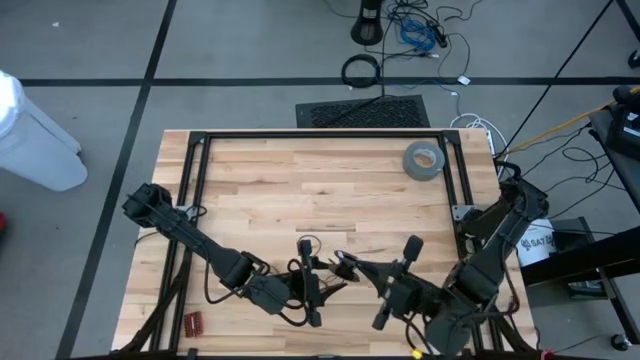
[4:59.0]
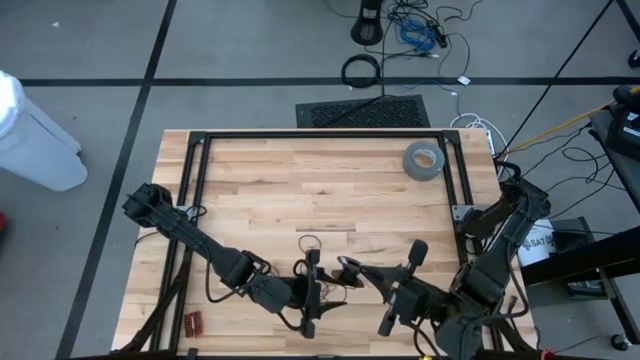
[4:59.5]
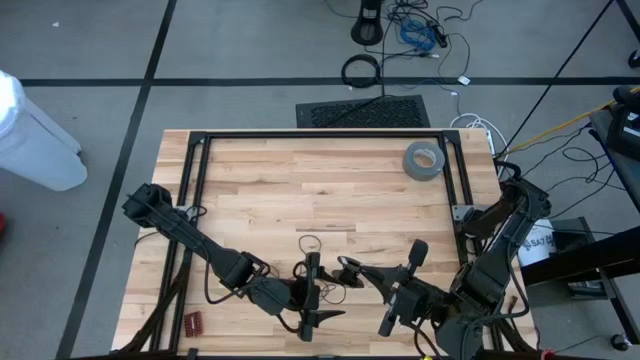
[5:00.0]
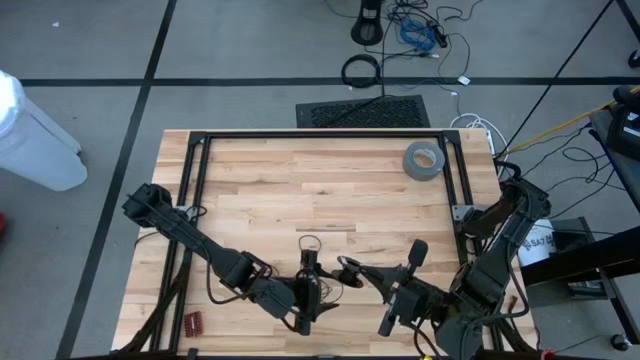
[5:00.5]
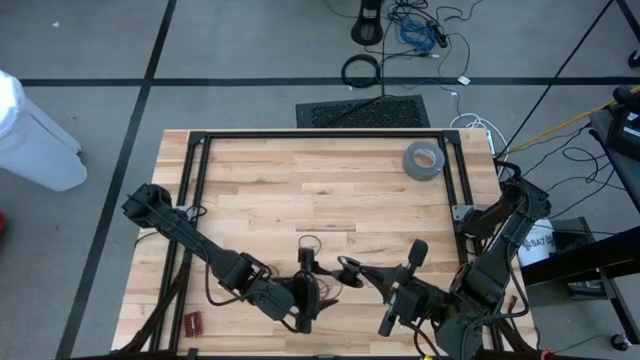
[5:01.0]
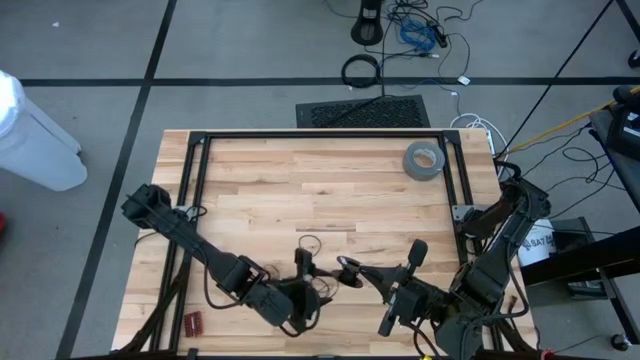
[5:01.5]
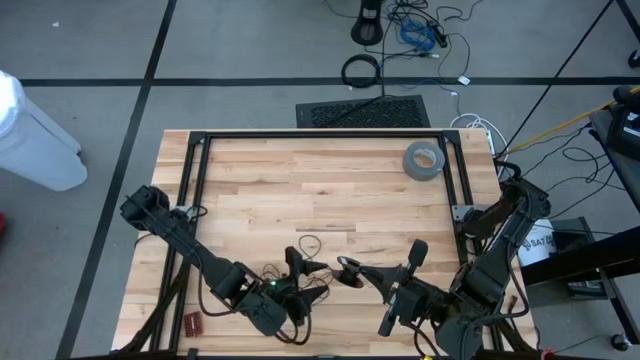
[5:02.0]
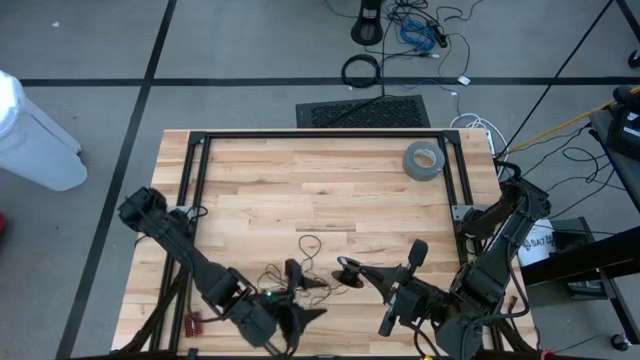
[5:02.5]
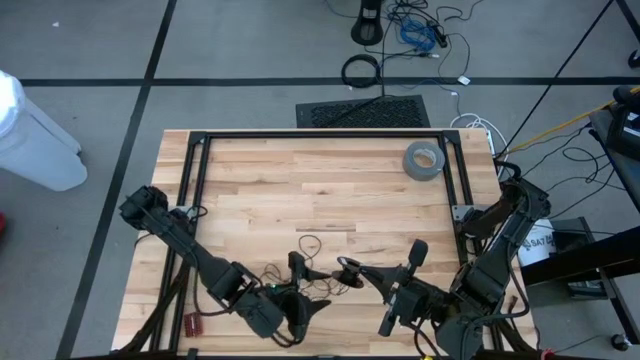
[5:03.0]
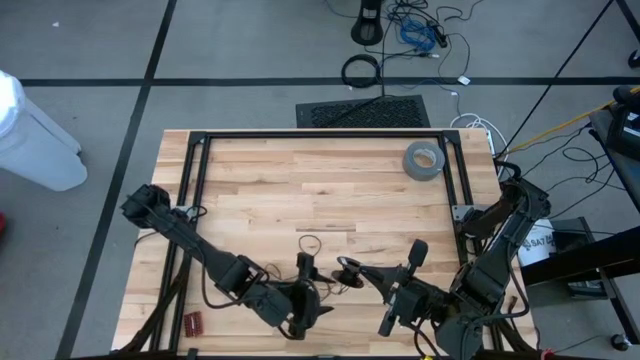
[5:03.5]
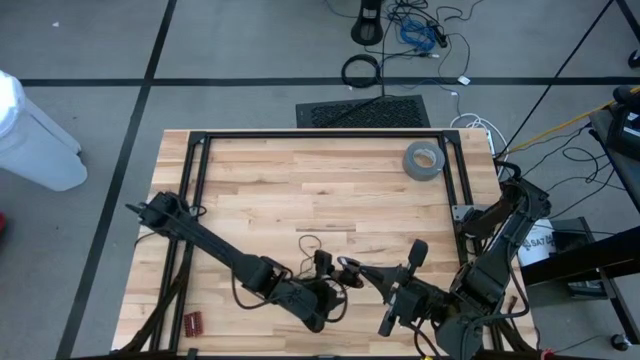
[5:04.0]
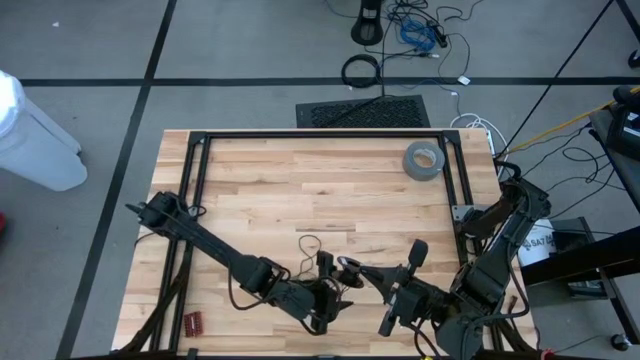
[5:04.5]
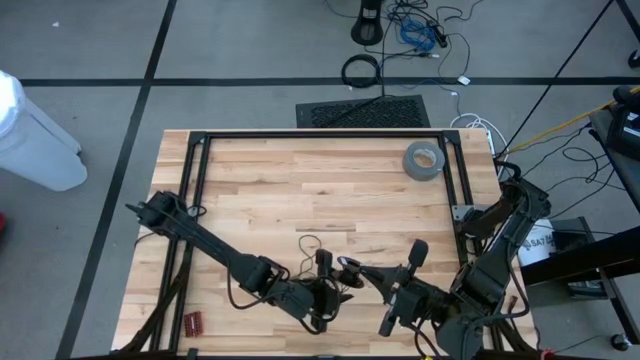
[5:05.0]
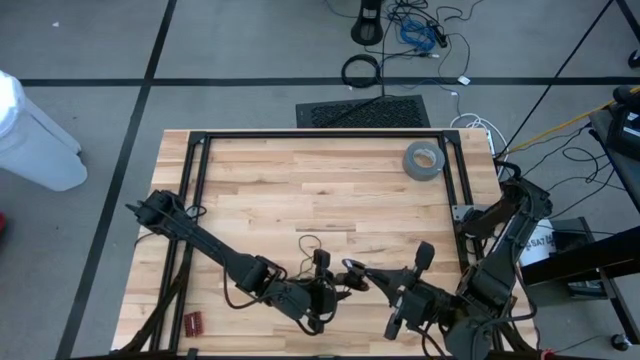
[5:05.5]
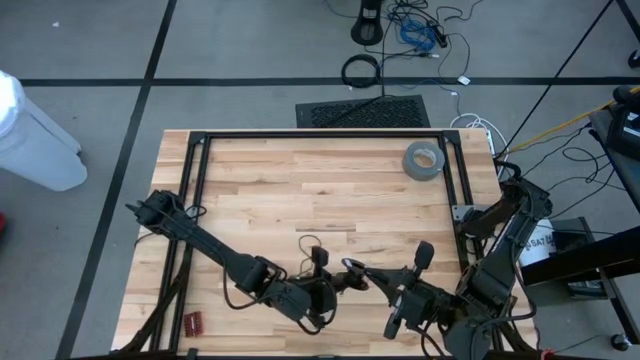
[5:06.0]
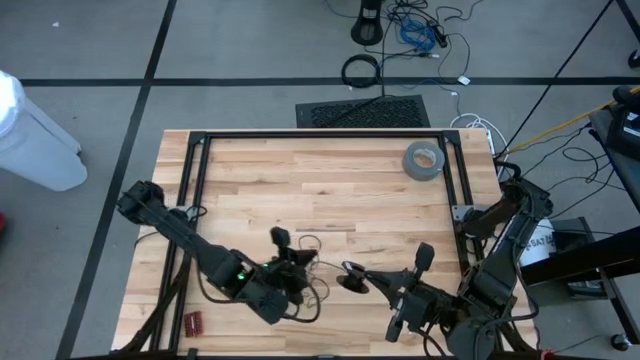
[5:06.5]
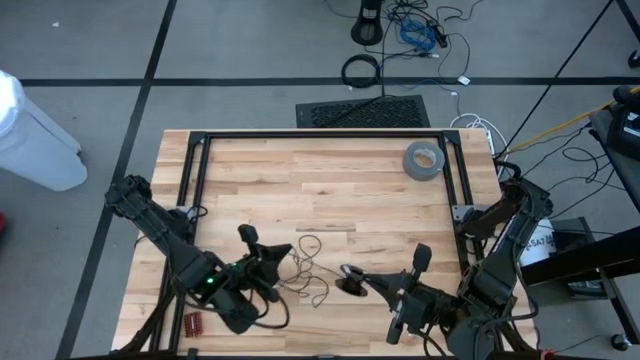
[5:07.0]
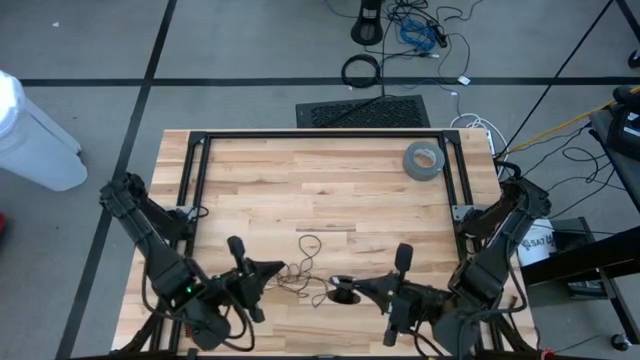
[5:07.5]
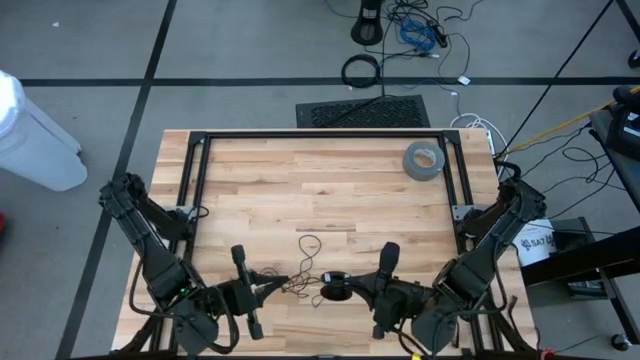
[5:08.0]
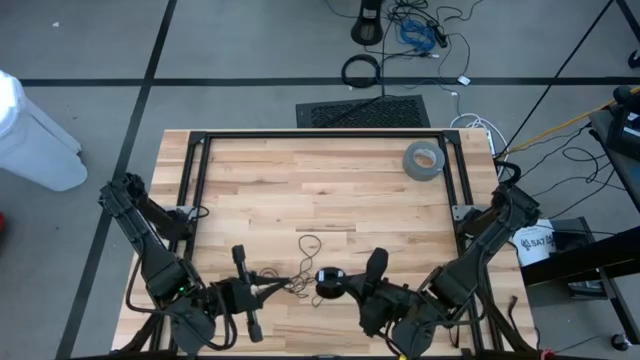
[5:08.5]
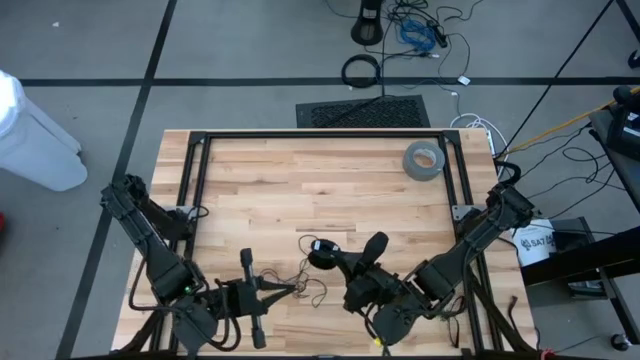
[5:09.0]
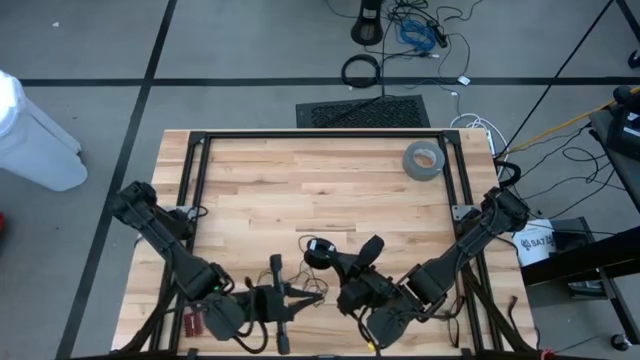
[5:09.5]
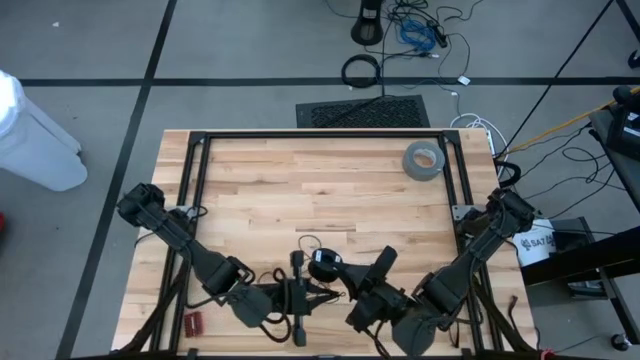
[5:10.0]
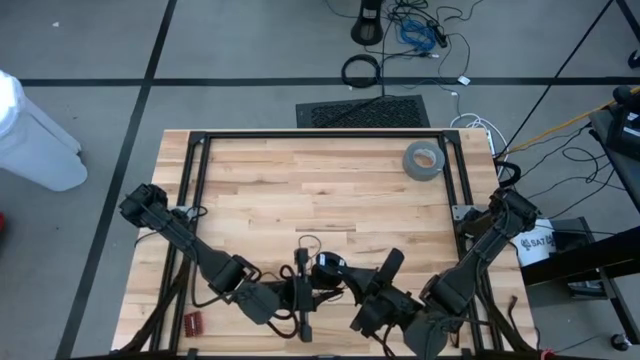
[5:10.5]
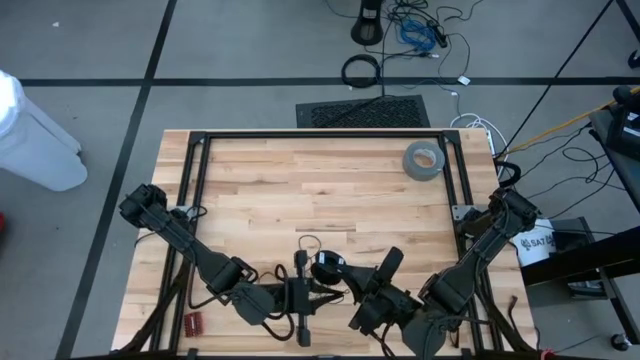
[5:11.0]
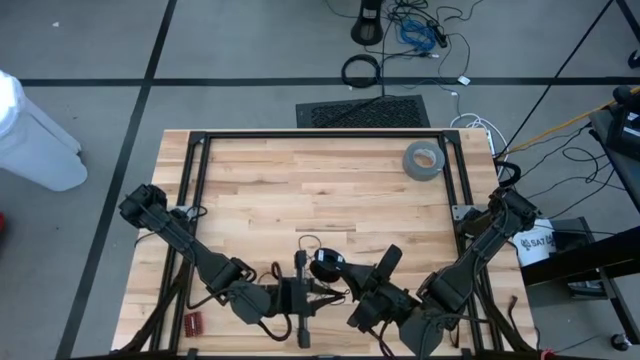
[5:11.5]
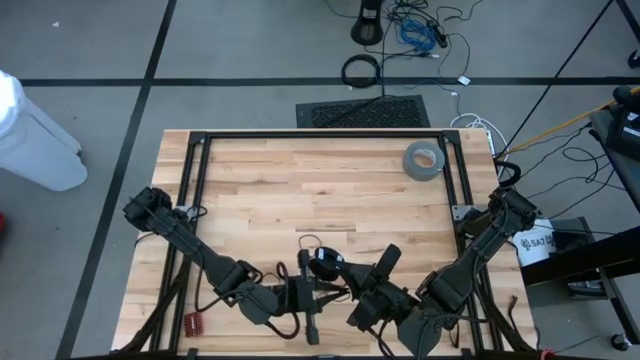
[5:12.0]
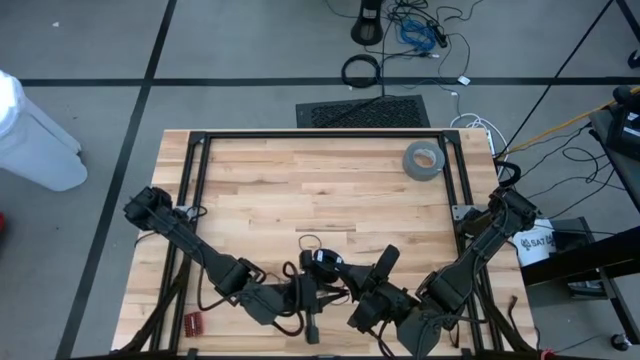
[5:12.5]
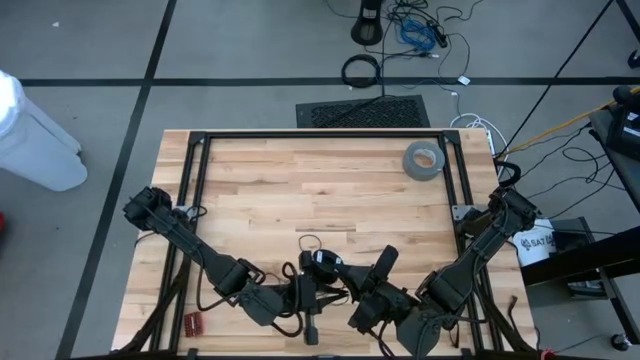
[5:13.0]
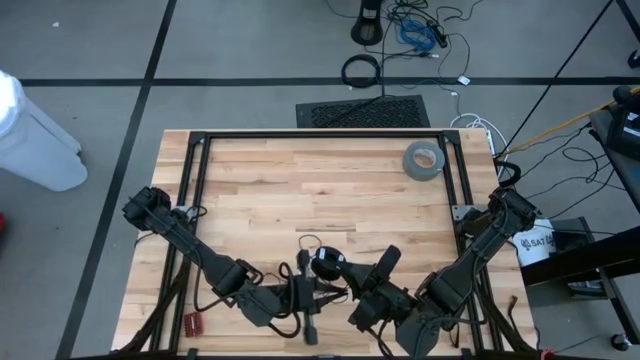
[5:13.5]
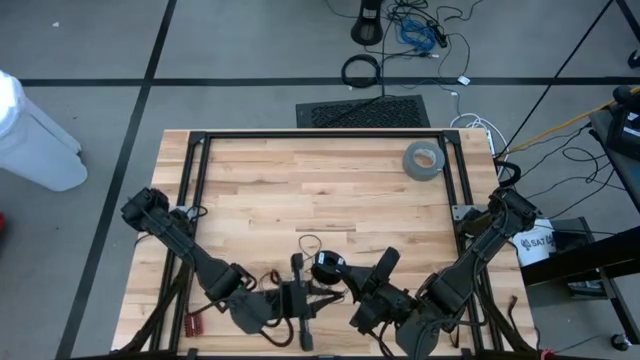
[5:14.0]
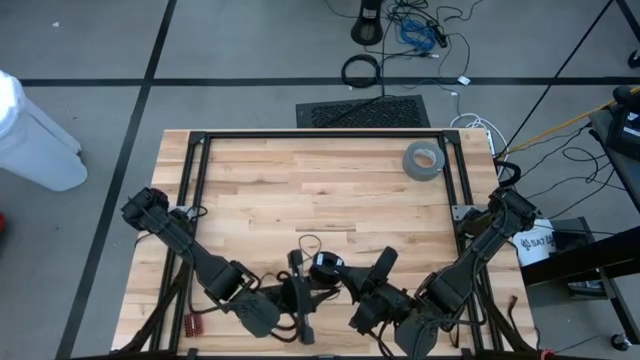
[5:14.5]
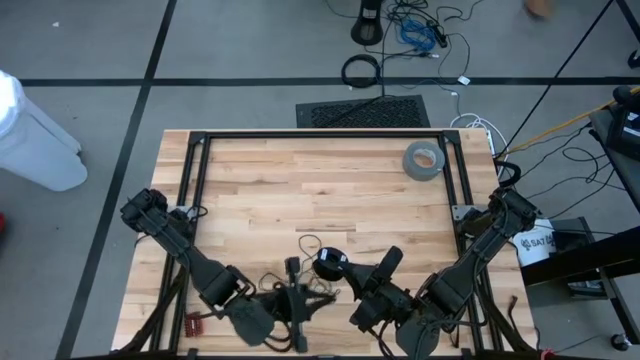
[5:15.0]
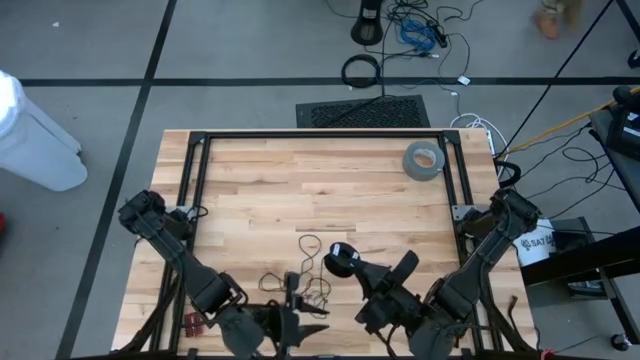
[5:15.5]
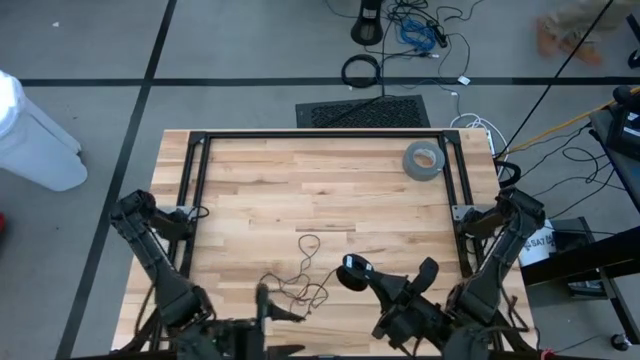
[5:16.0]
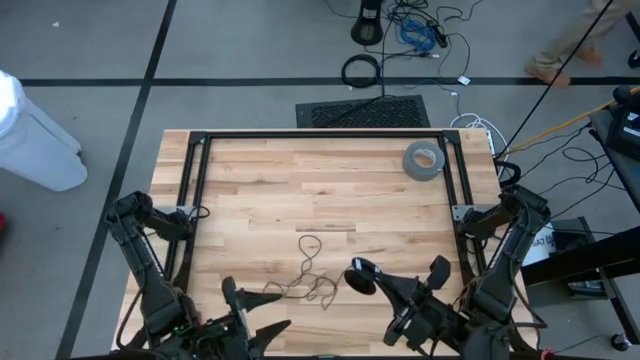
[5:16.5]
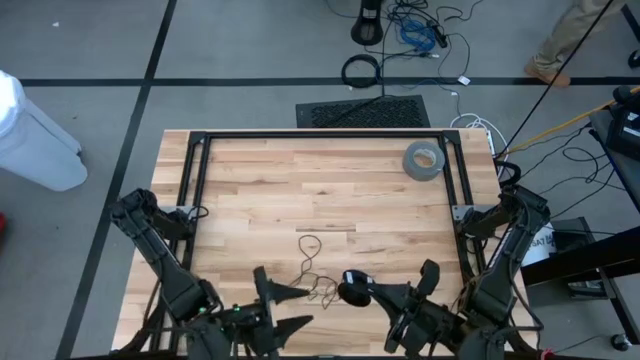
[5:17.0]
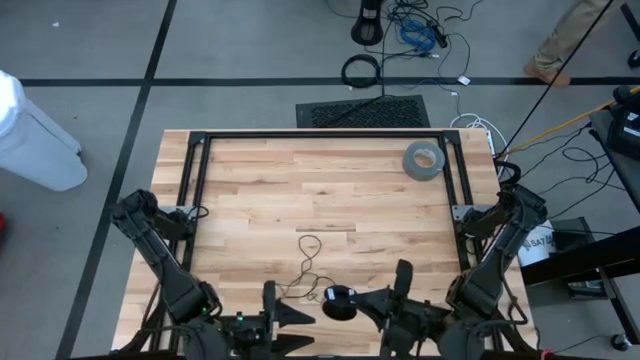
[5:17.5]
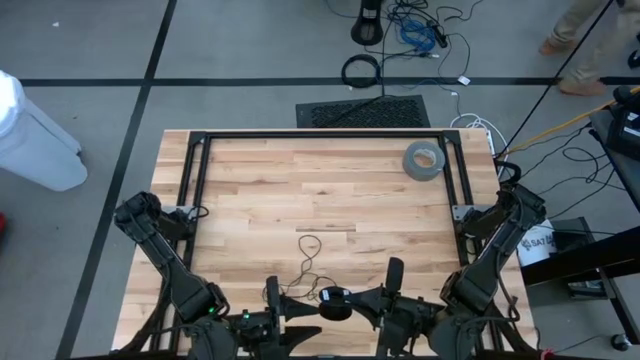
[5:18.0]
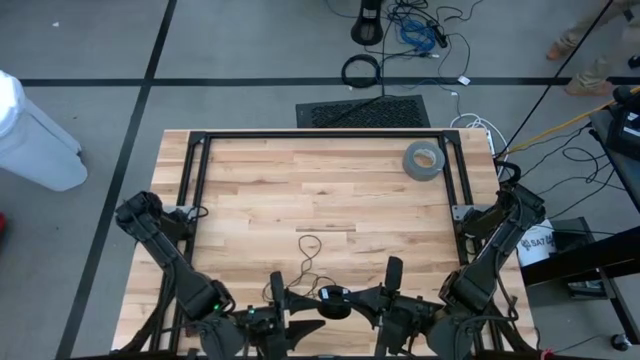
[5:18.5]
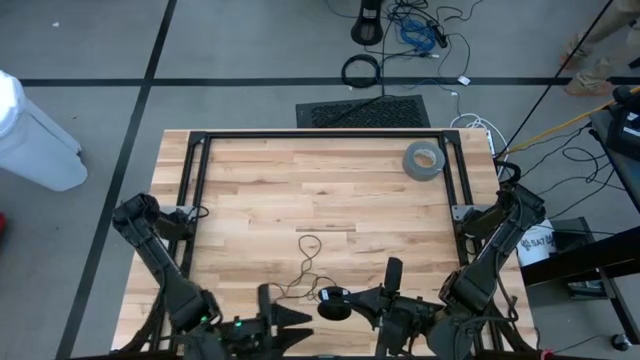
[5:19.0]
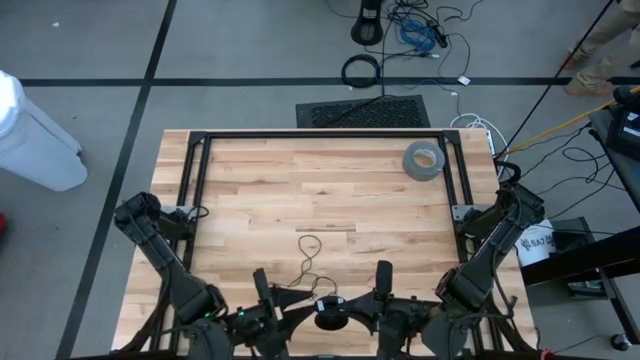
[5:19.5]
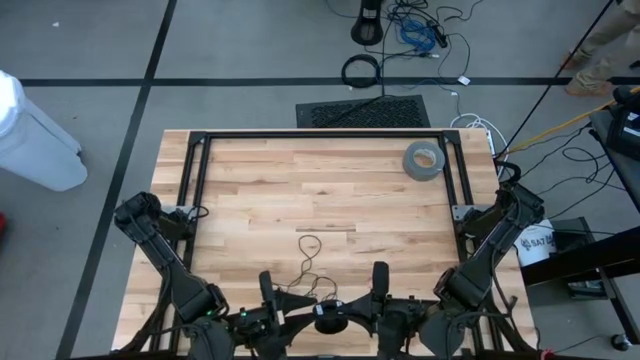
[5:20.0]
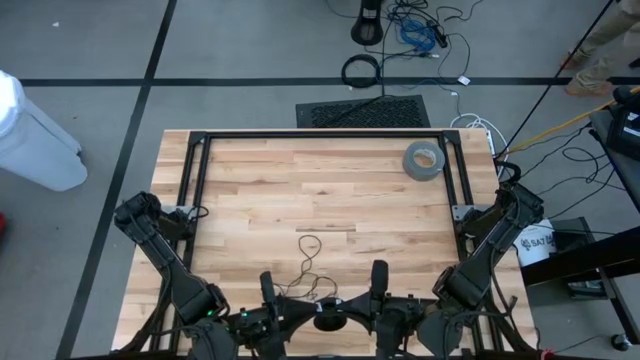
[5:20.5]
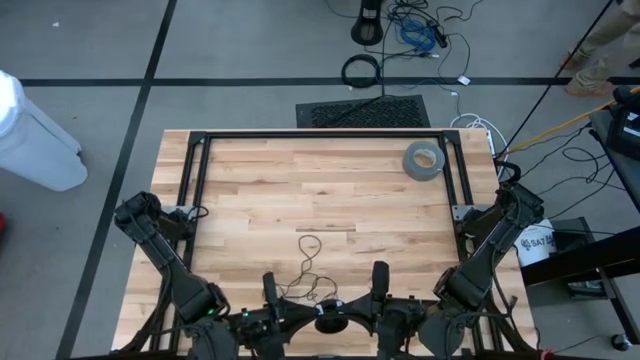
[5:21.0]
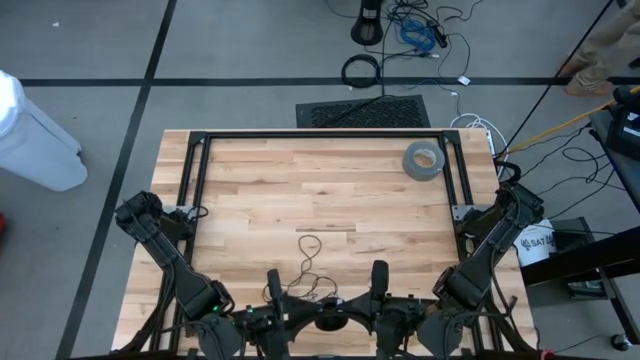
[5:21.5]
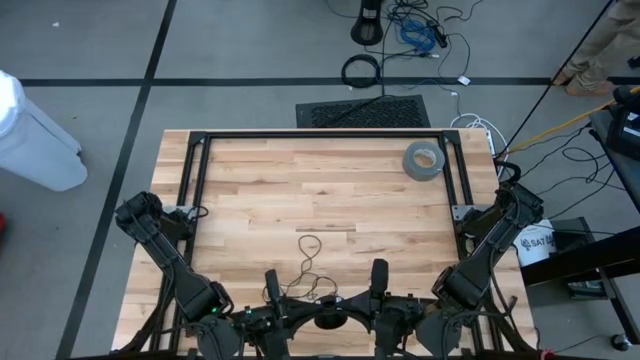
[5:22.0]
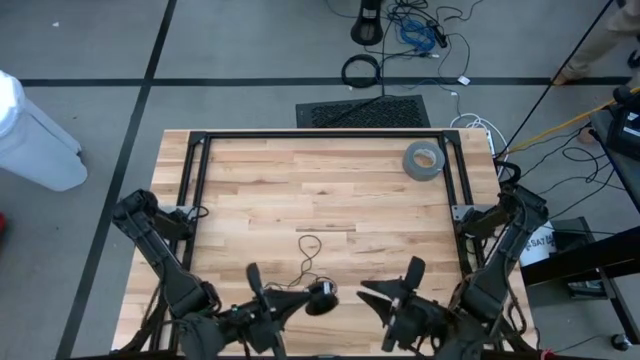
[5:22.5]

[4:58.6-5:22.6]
Task: Coil cords
Coil the black wire onto the spool
